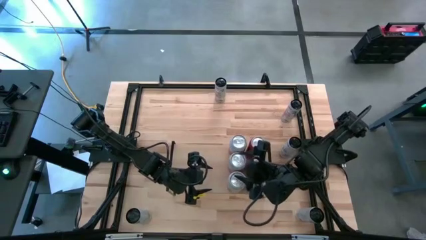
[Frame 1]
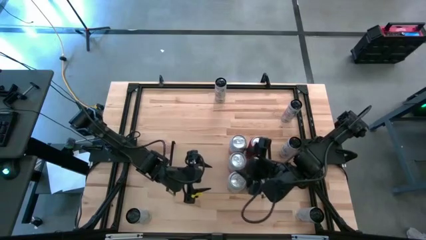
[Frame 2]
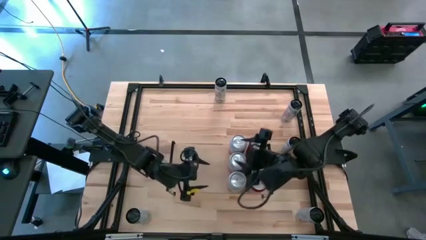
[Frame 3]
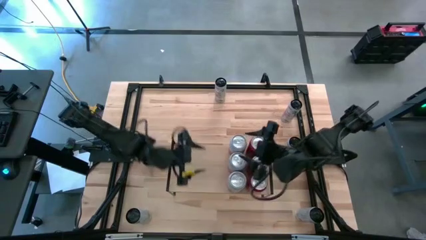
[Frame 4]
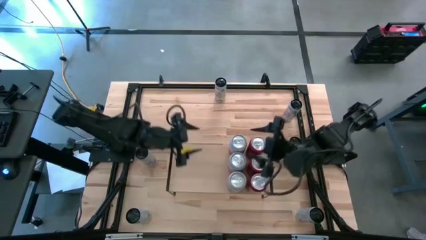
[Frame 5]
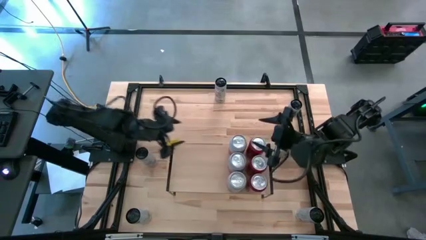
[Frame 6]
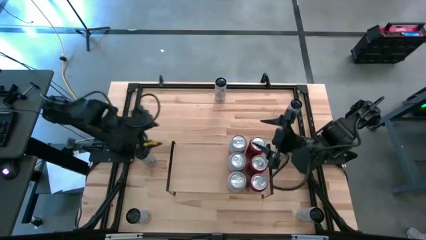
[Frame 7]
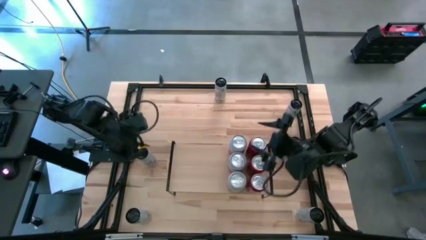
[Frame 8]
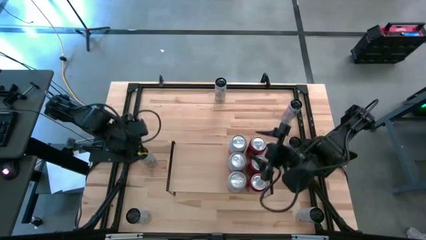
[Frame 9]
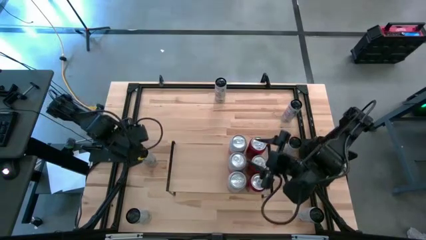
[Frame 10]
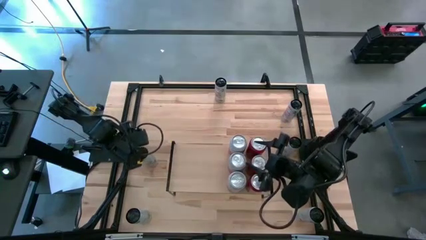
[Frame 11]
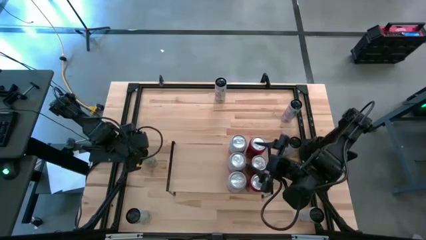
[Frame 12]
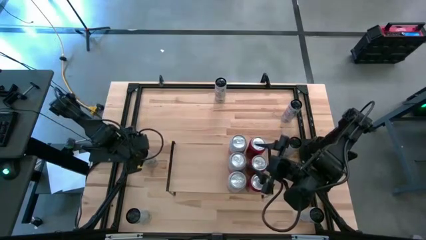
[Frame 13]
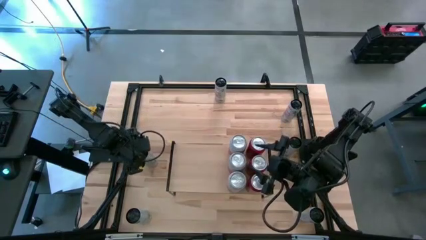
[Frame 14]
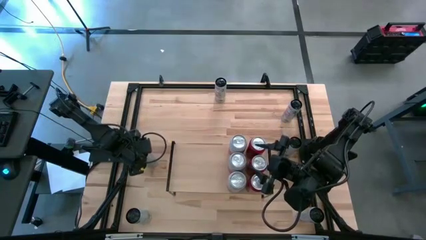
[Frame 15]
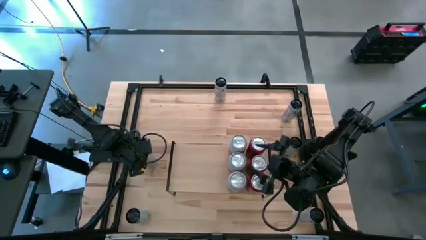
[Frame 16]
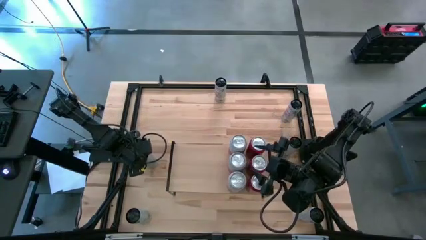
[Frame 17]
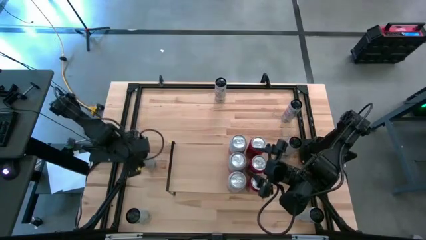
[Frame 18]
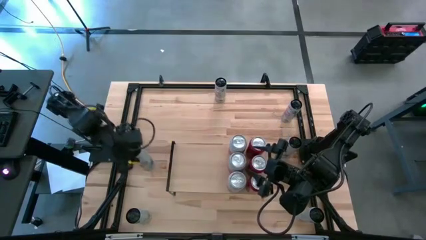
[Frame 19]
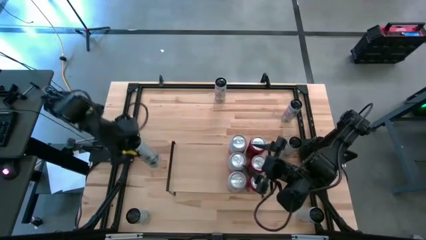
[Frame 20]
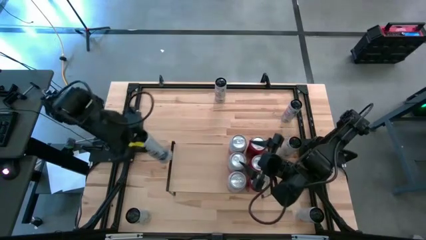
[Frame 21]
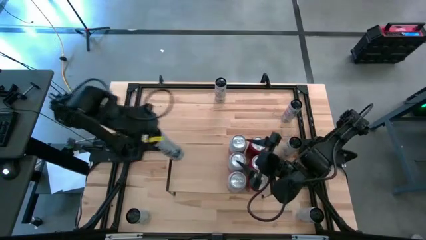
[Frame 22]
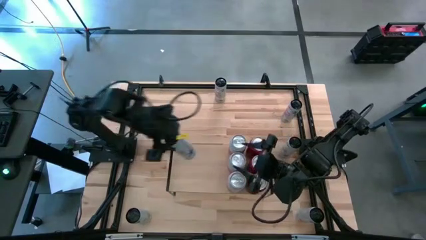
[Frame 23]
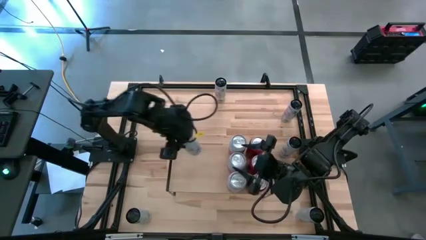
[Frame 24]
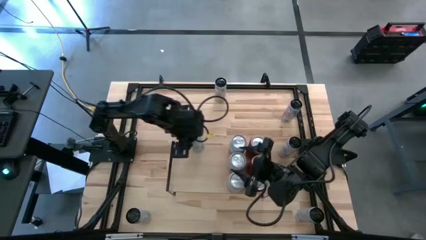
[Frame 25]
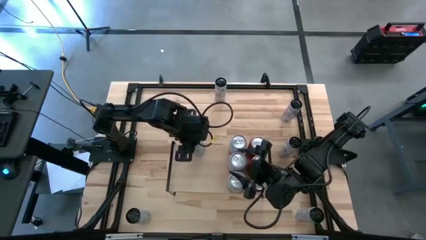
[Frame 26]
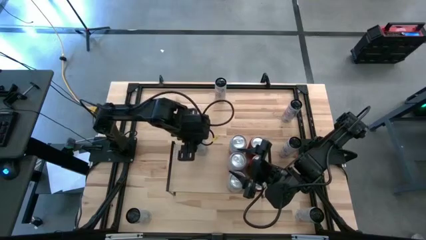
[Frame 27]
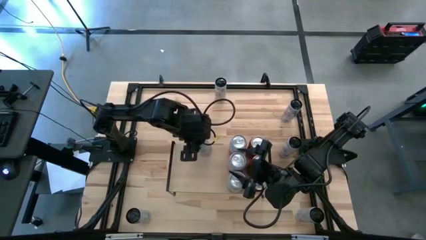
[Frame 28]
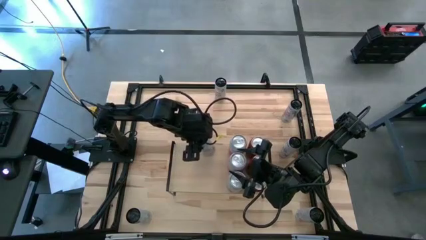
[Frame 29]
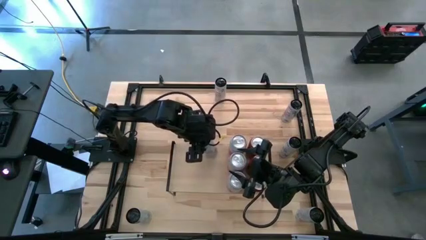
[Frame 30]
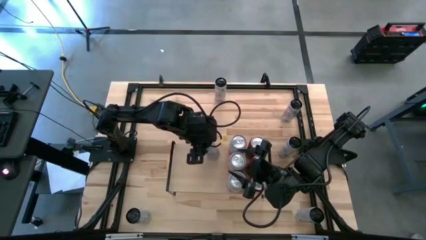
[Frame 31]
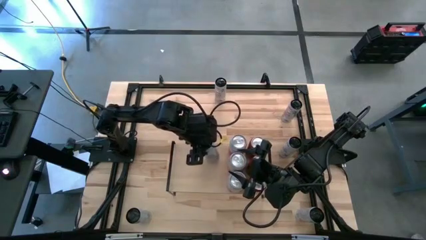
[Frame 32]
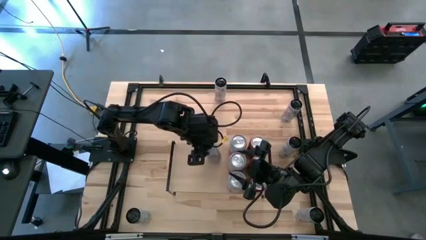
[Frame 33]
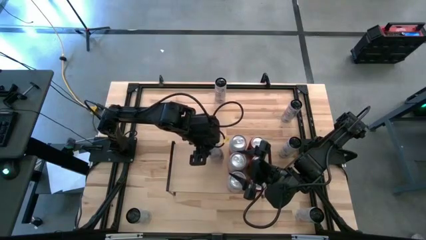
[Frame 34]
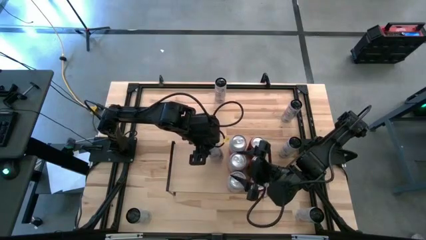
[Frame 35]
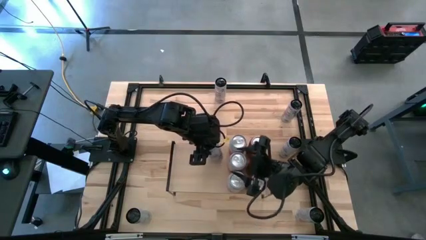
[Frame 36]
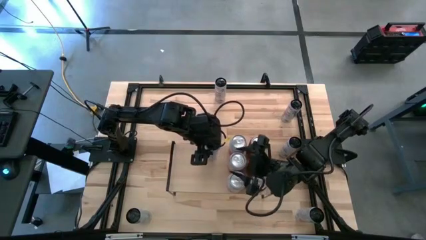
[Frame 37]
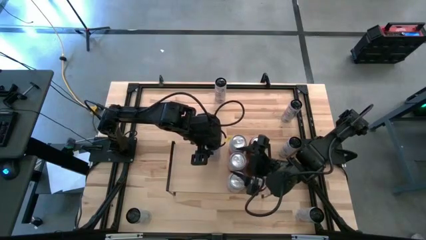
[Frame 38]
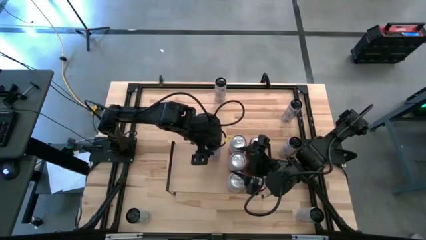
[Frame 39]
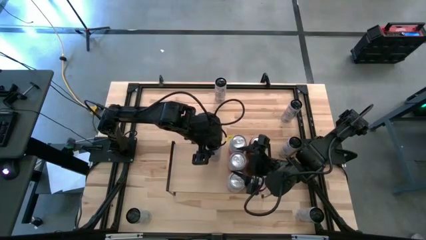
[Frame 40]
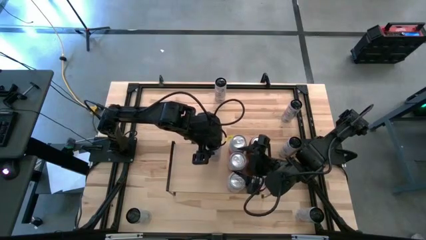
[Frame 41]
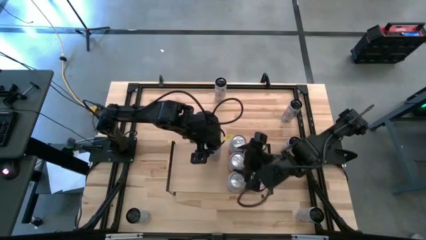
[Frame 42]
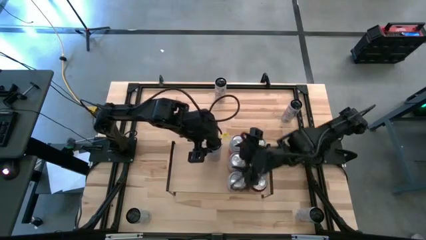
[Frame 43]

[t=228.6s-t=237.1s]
Task: Place canned beverage on shelf
Put the top left white-blue soda can on the shelf

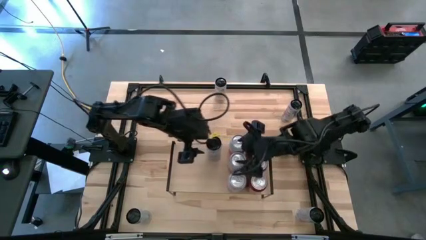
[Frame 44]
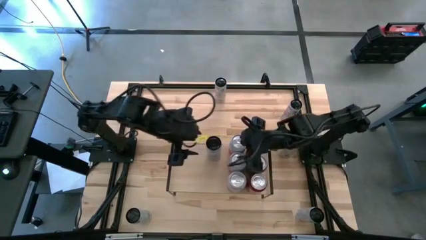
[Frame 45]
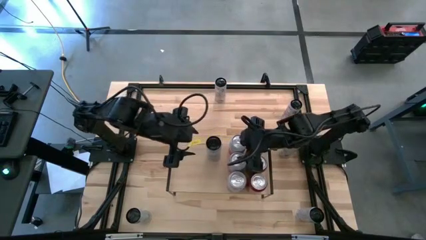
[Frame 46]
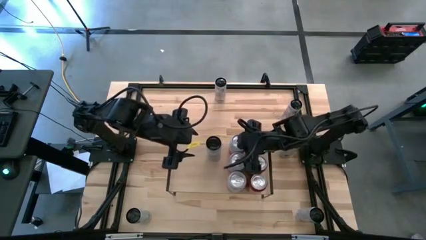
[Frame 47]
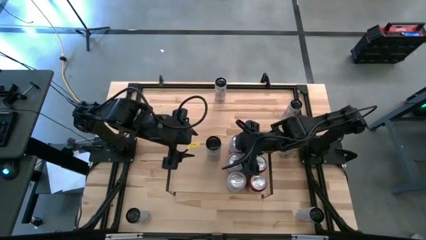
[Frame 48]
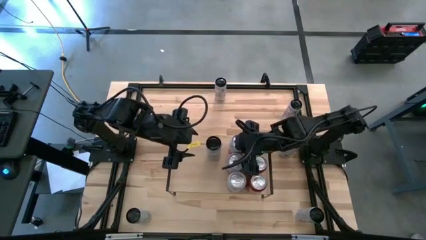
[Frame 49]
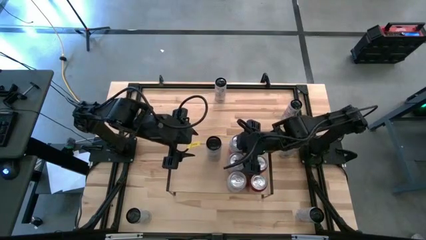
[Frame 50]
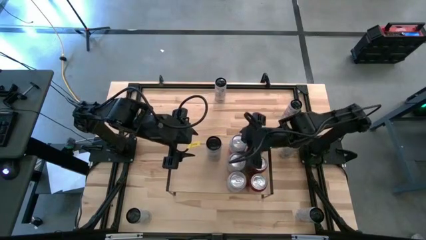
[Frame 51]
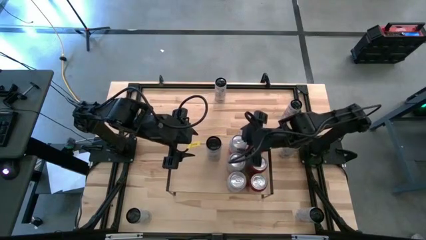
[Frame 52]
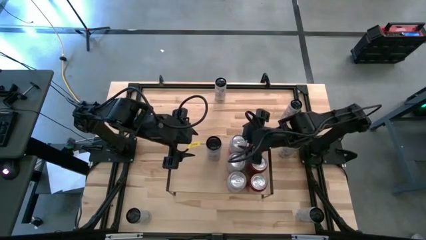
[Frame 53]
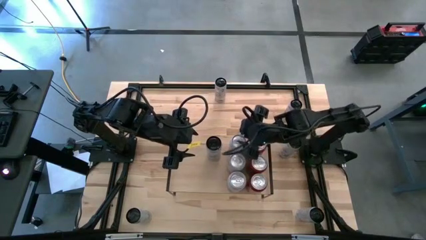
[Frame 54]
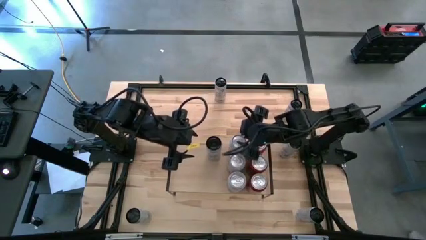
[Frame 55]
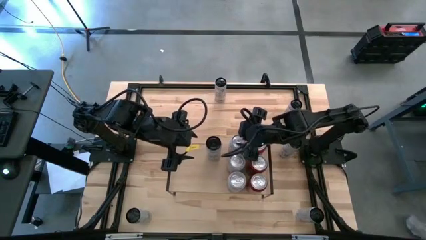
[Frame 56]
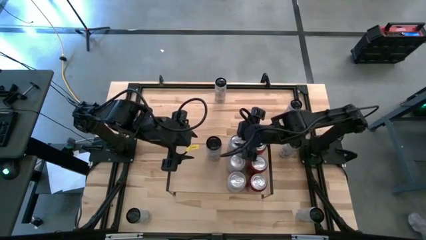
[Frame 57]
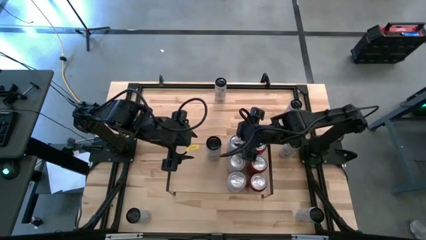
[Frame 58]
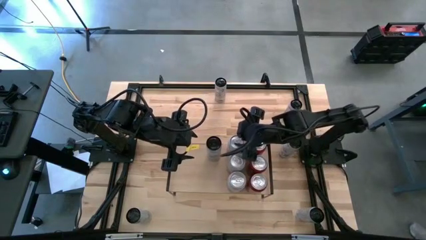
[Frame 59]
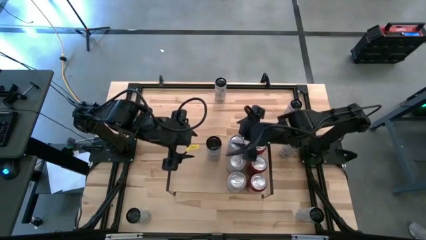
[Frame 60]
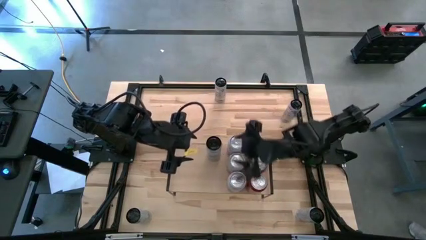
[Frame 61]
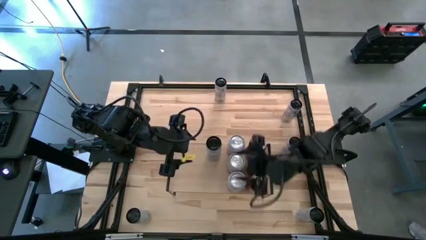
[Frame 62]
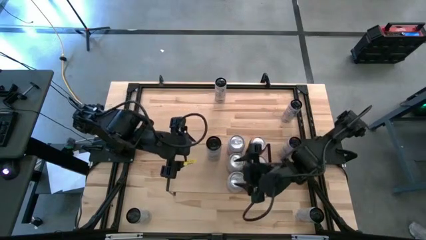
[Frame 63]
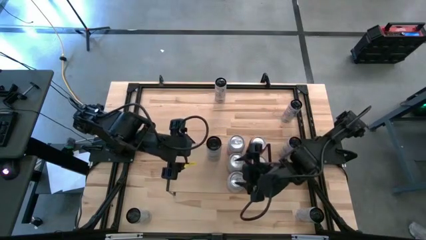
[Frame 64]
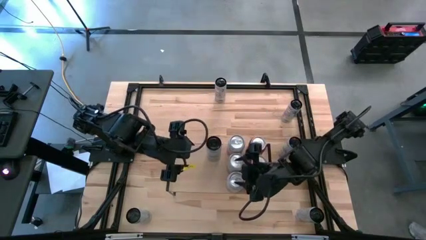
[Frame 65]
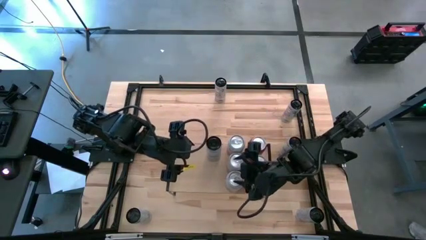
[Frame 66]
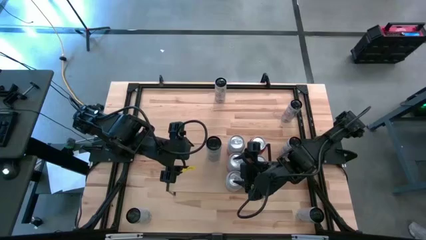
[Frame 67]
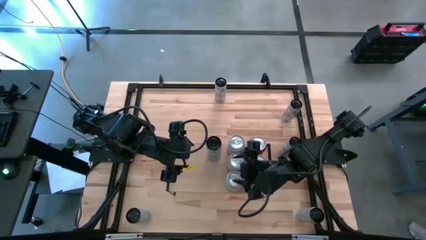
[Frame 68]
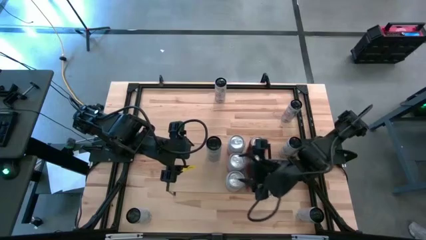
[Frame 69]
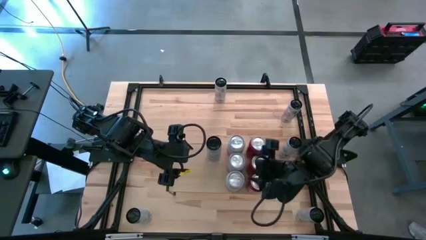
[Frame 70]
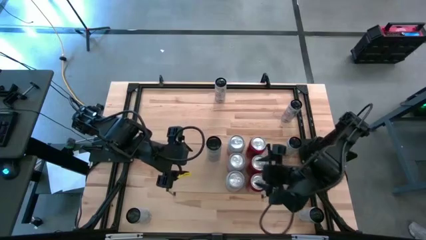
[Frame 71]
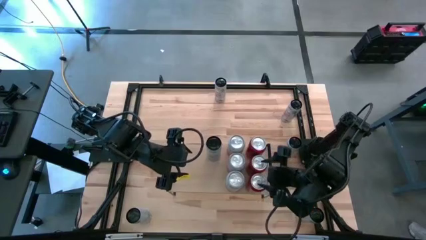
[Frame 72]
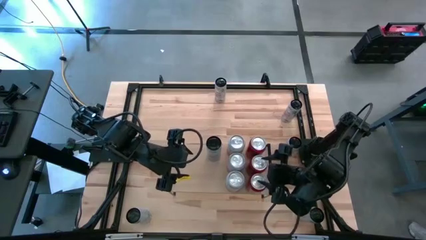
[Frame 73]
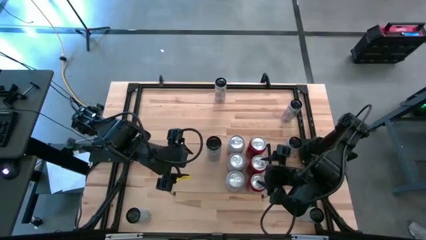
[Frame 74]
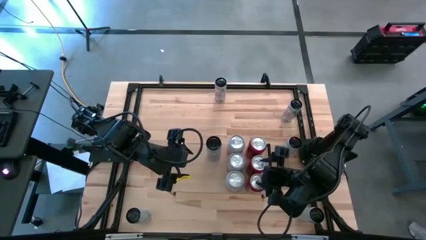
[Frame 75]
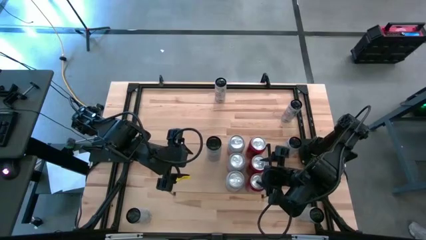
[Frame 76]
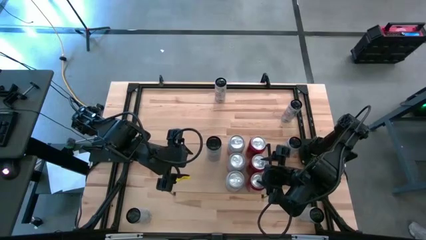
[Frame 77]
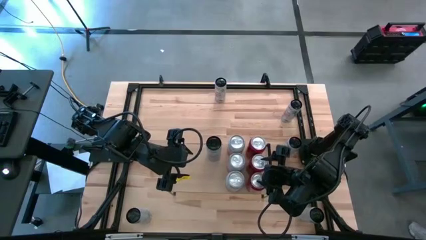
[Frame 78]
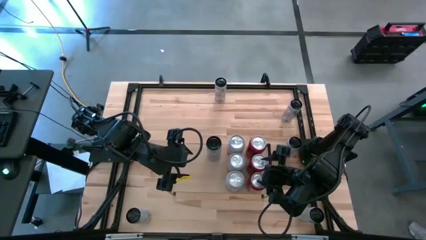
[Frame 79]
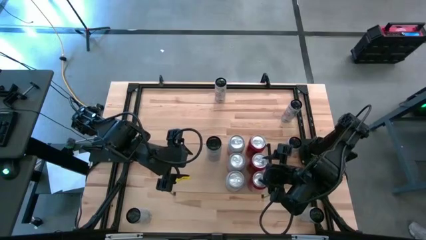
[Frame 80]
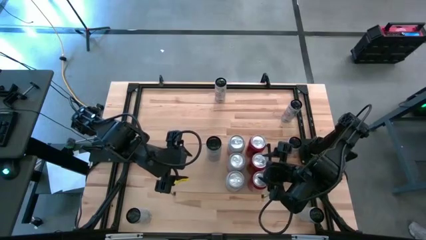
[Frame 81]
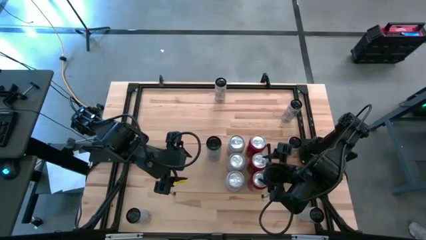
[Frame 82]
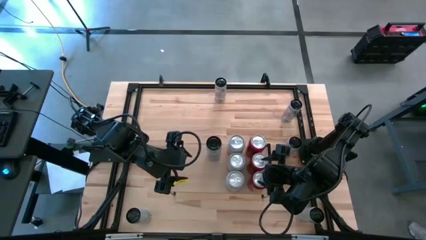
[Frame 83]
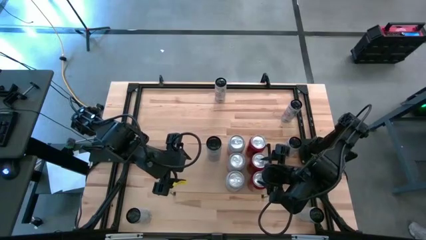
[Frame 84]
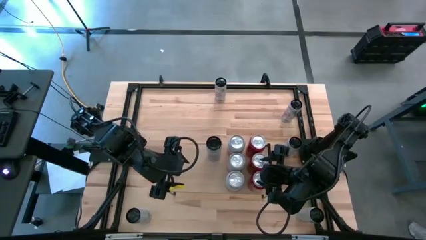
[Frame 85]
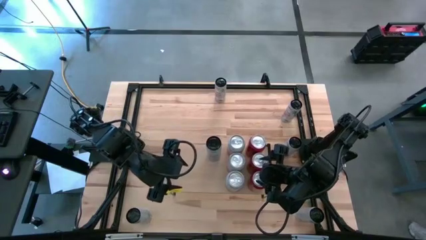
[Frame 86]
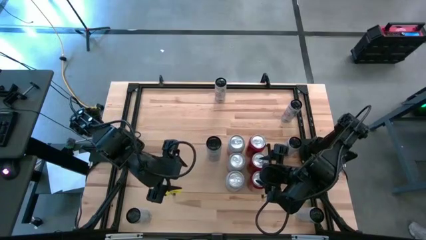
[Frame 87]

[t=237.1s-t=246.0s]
Adjust the pink-white and red-black soda cans on the shelf
